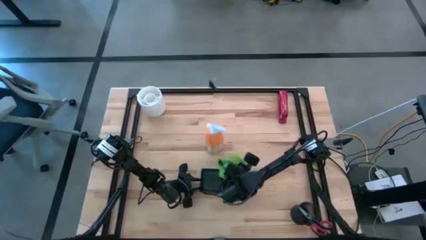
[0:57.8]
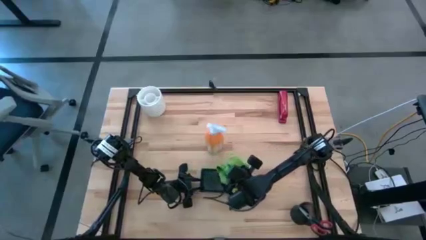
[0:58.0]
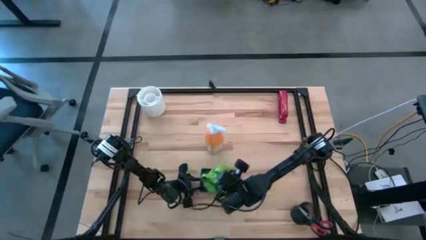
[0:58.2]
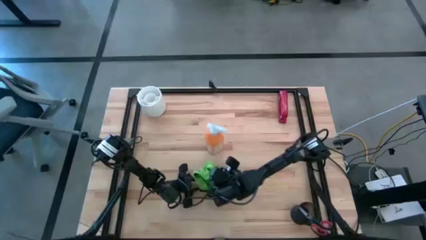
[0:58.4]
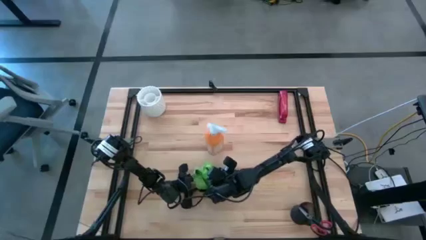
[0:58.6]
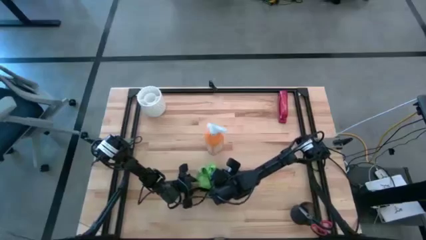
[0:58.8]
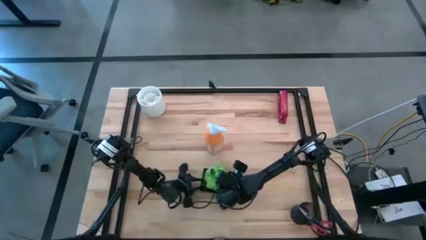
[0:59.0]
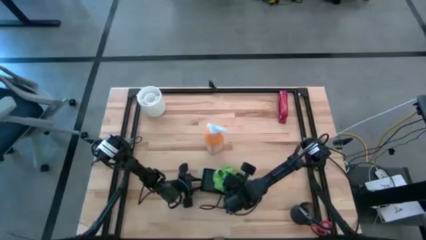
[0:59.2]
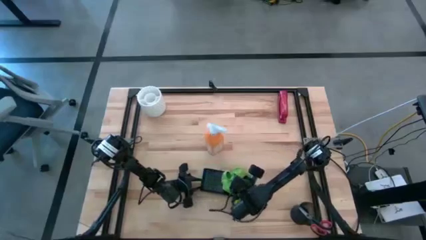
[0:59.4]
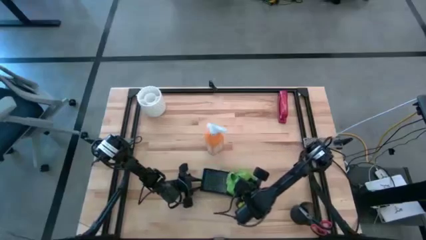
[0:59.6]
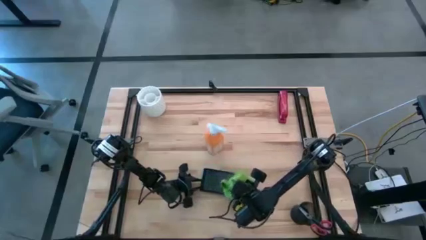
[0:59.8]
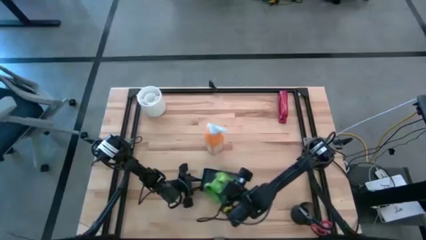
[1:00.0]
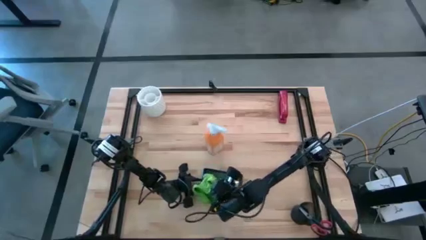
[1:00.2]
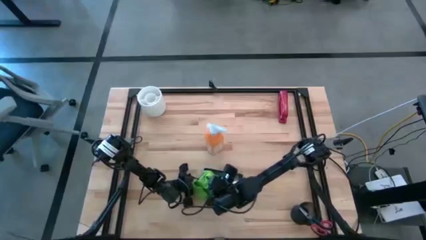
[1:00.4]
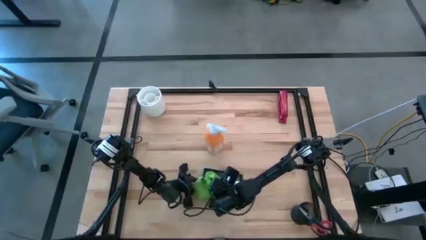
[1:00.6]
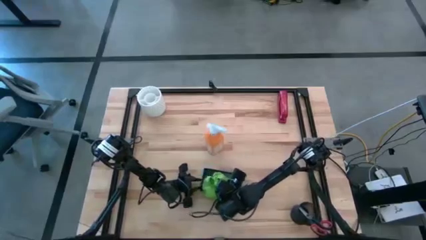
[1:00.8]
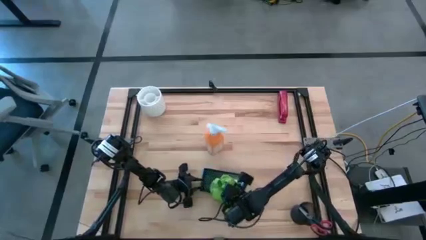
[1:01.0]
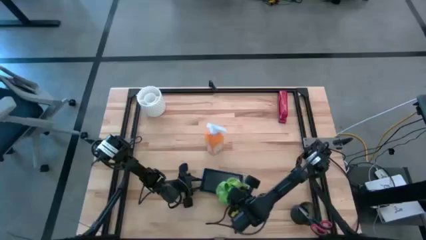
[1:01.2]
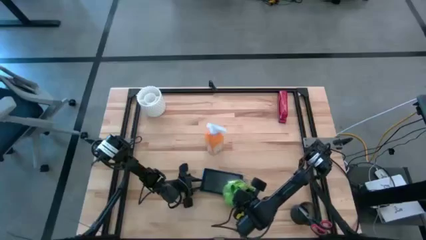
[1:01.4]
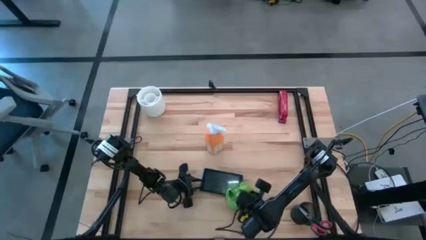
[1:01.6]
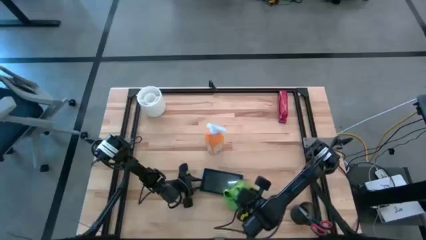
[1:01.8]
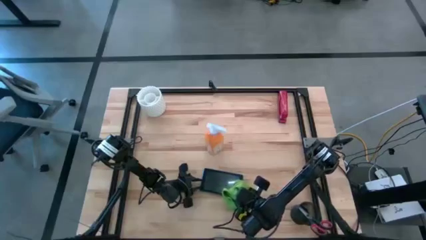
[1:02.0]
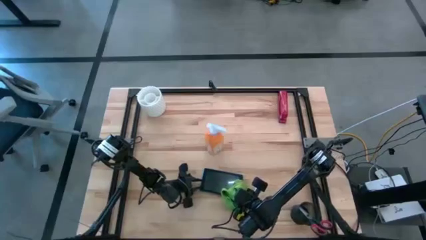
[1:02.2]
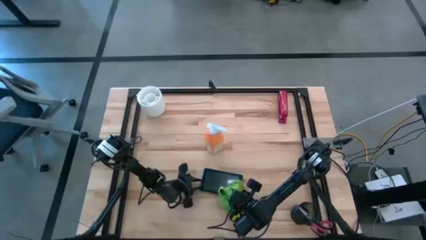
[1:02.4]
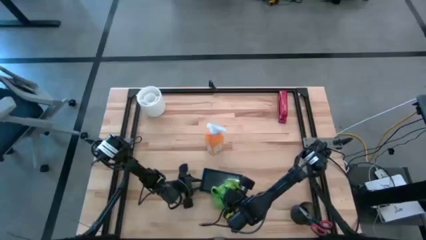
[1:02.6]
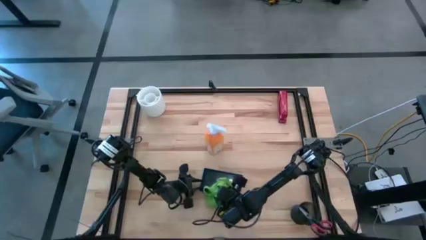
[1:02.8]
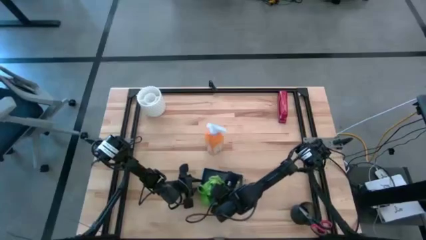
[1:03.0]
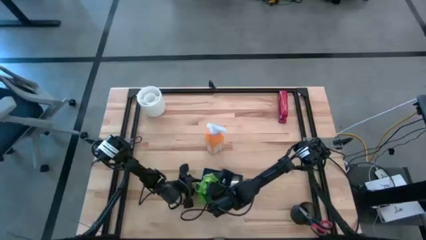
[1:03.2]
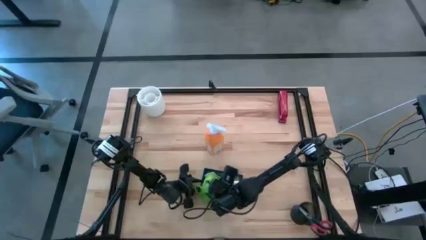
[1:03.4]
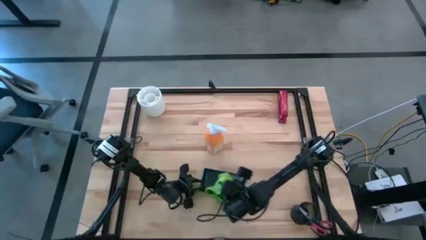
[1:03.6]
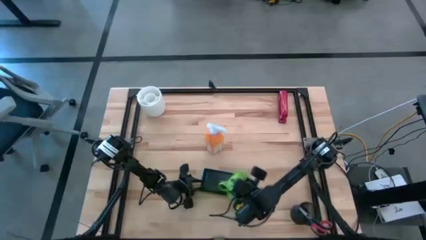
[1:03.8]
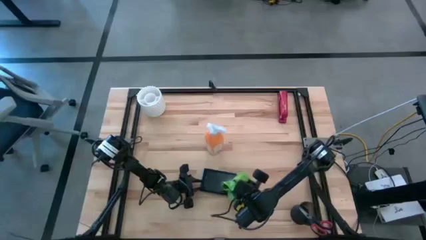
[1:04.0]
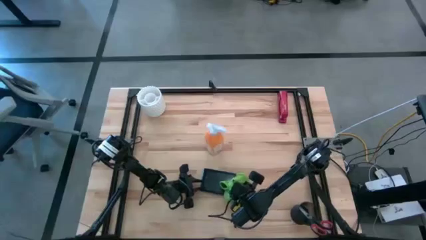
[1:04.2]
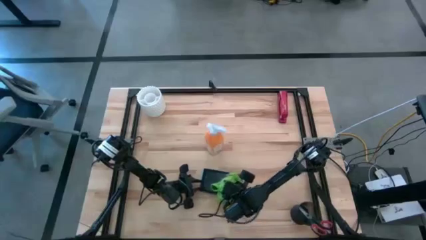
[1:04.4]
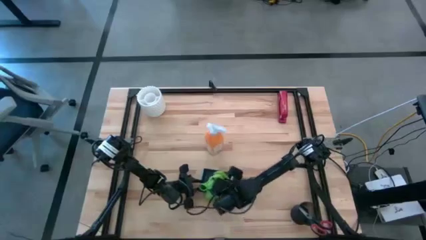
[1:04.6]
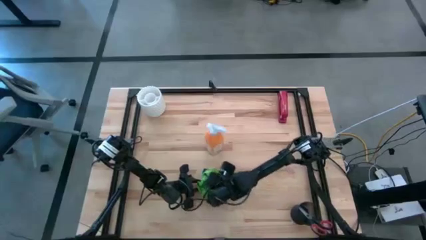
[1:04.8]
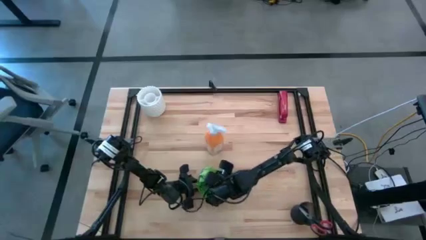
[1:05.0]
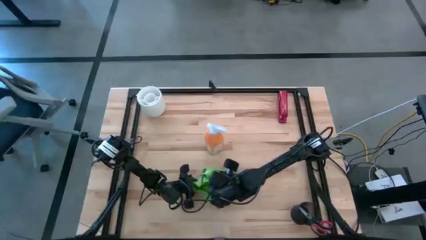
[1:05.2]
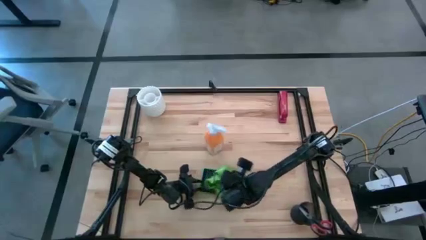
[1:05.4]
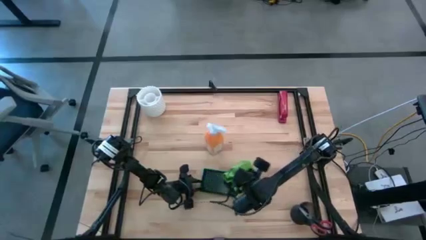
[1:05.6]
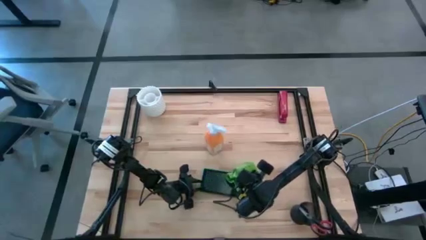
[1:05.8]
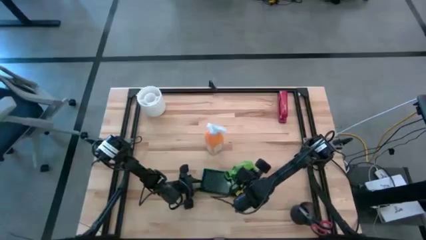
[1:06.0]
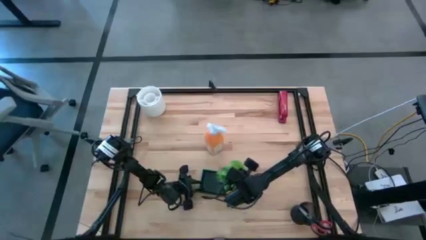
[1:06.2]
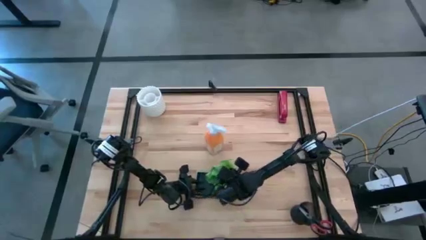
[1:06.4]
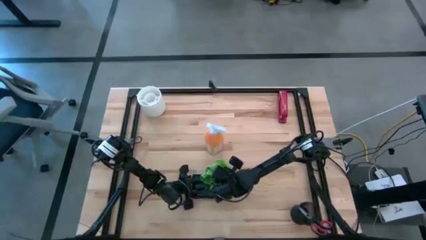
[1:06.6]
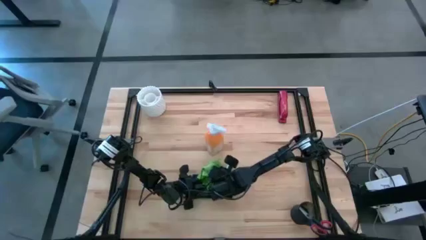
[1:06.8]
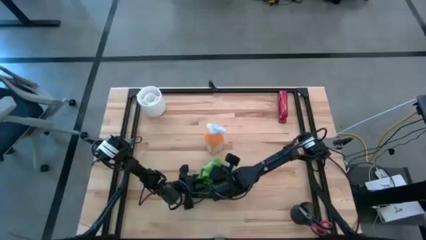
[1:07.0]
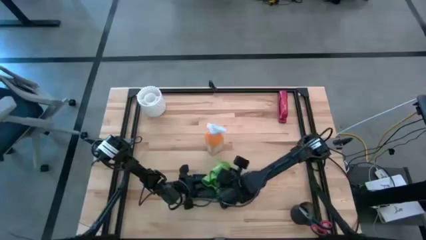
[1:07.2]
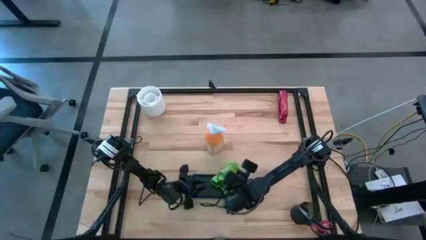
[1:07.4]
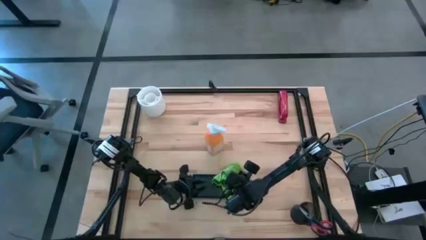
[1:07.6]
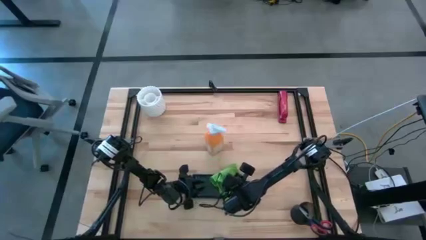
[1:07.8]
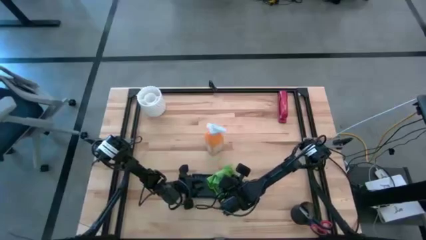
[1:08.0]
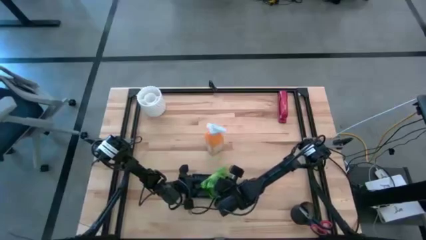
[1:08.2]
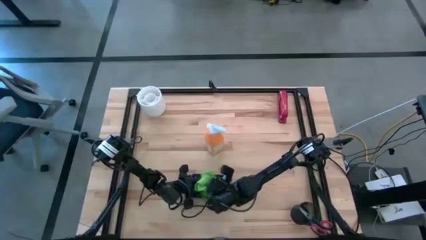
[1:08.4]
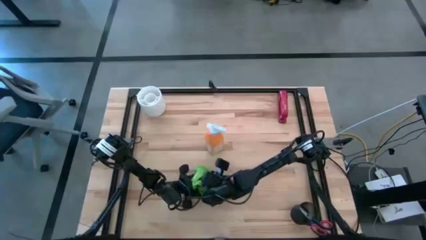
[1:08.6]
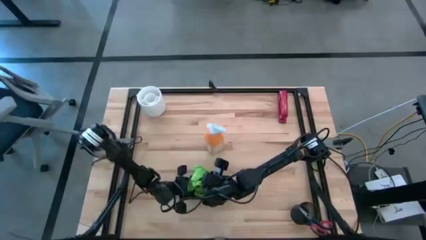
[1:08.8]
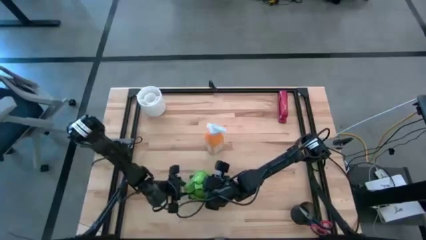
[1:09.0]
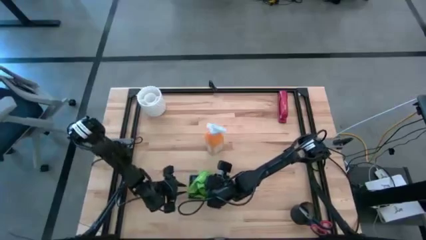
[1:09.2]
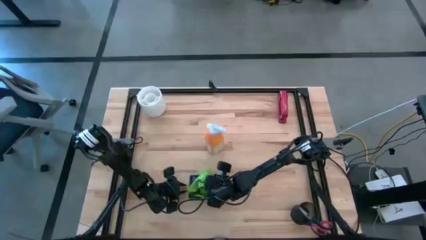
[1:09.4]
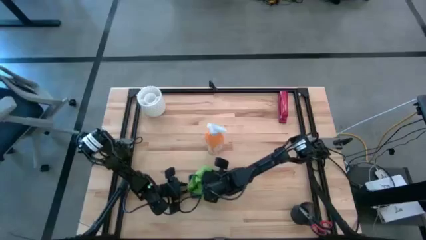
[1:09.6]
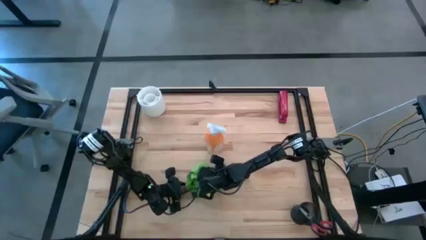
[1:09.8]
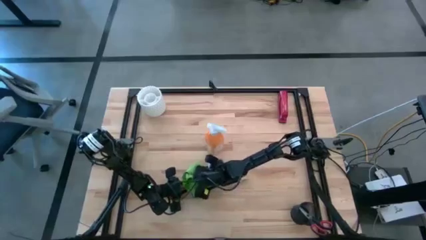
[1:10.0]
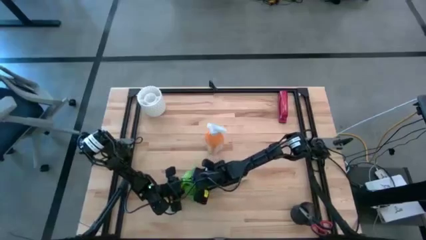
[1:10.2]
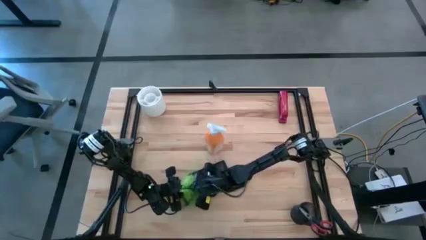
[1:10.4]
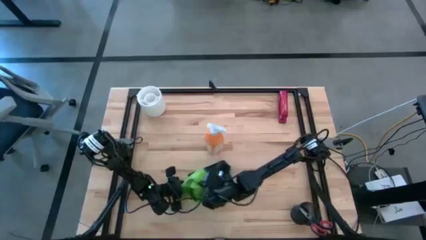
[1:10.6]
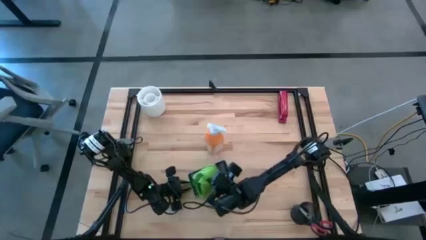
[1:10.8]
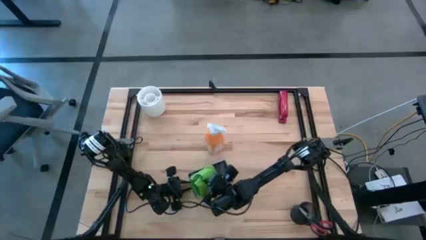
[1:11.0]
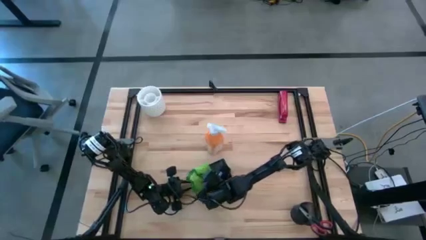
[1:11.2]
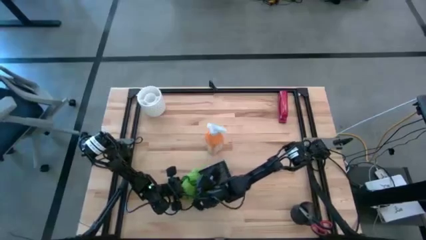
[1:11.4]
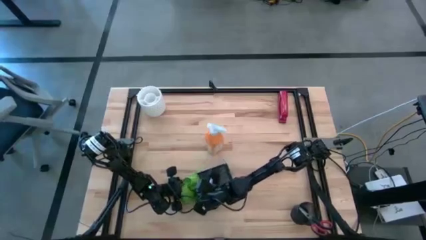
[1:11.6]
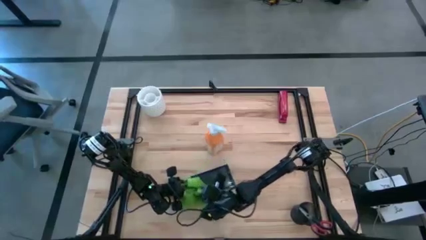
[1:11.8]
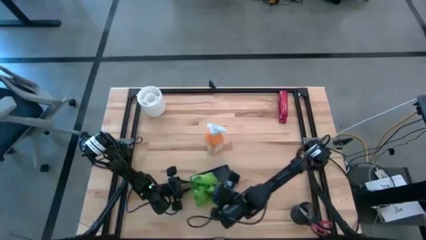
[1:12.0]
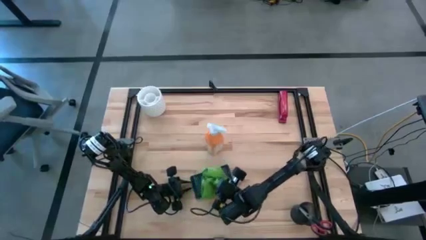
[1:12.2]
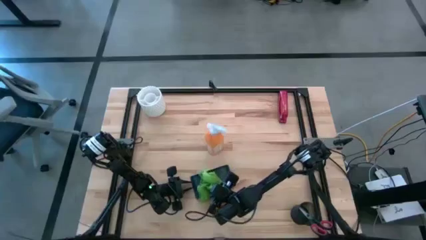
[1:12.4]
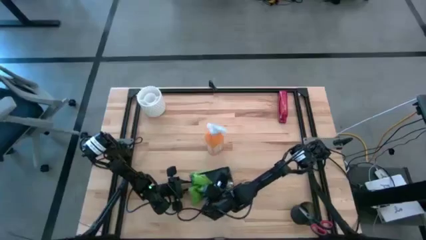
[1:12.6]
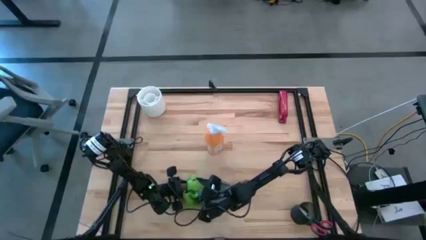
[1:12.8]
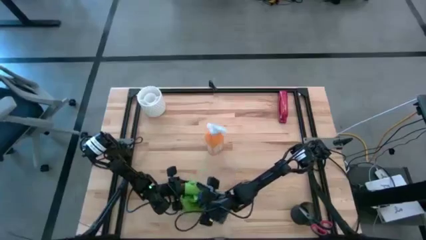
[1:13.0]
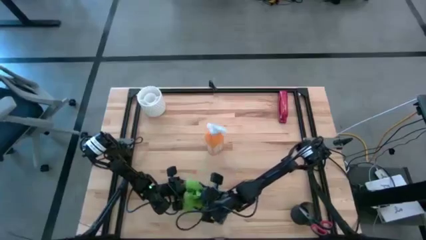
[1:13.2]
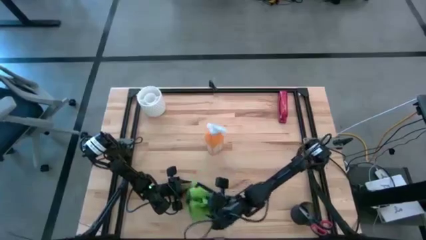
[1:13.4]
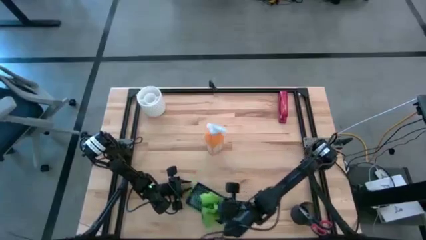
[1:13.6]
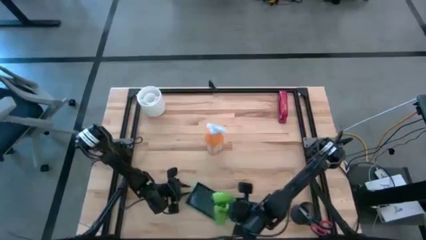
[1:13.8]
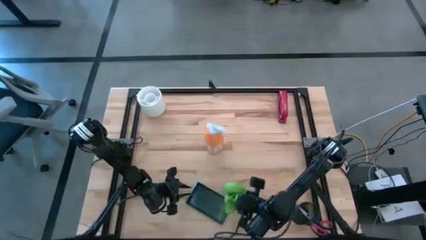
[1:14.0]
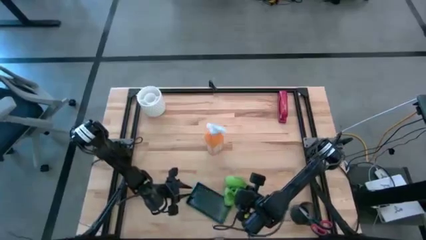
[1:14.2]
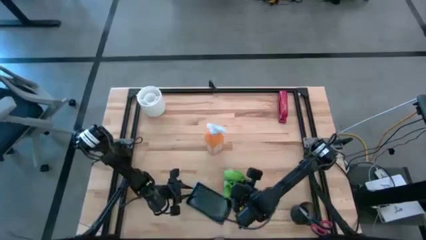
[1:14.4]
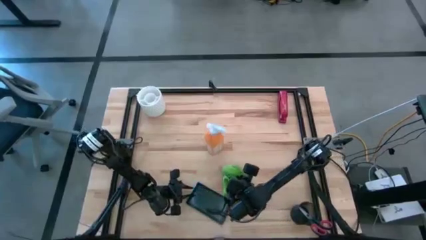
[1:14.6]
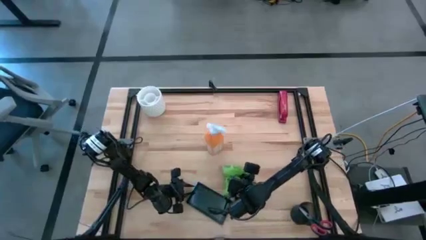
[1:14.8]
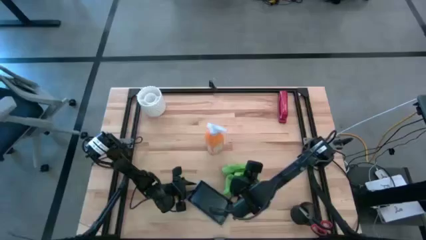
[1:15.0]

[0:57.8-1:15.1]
Task: Apply microfiber cloth
Wipe the blue tablet with the green microfiber cloth
